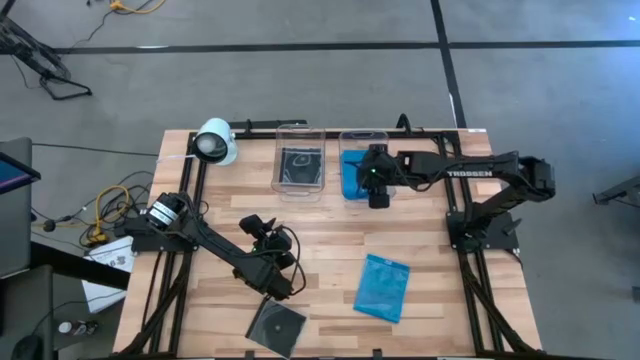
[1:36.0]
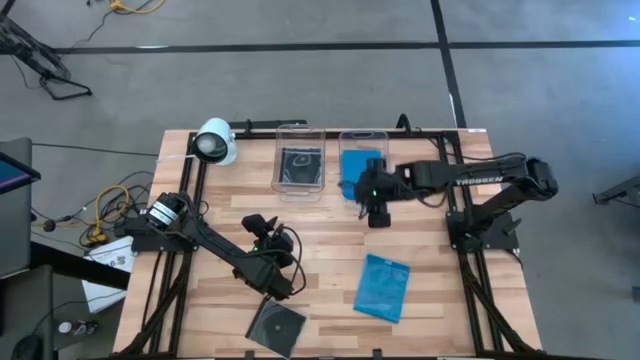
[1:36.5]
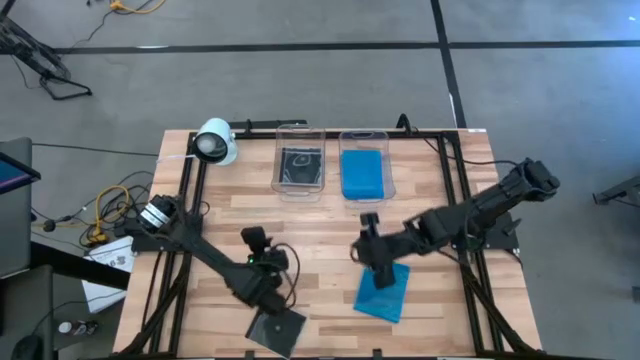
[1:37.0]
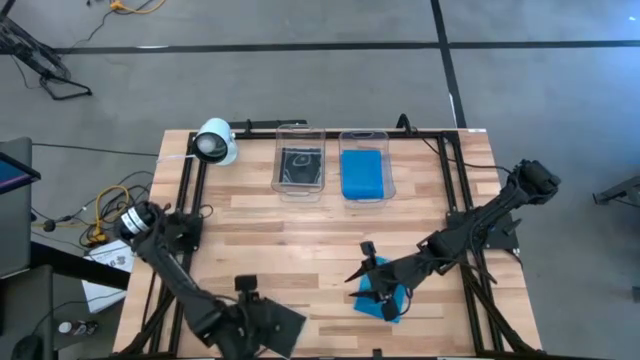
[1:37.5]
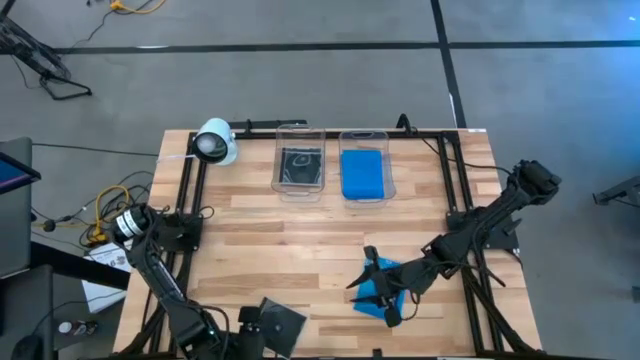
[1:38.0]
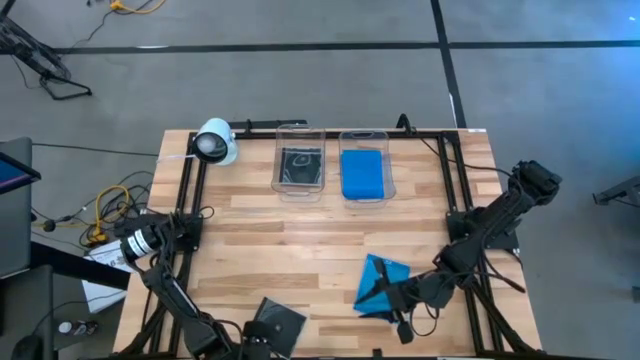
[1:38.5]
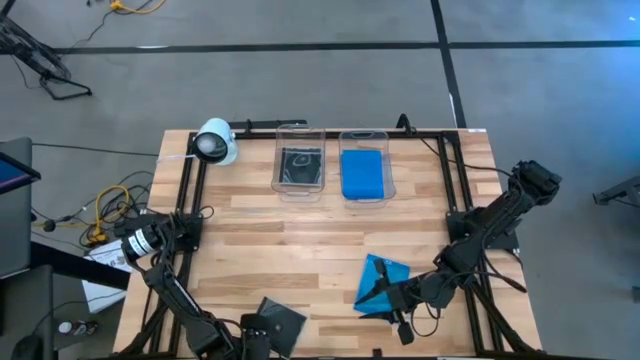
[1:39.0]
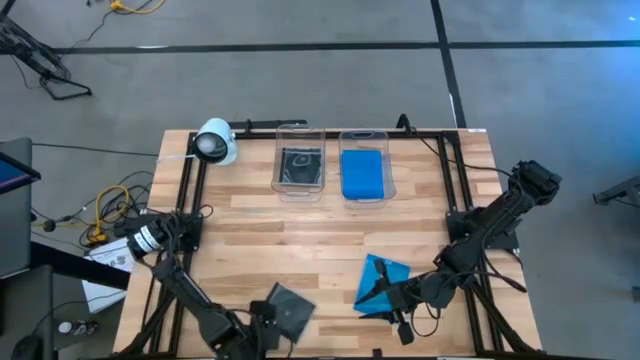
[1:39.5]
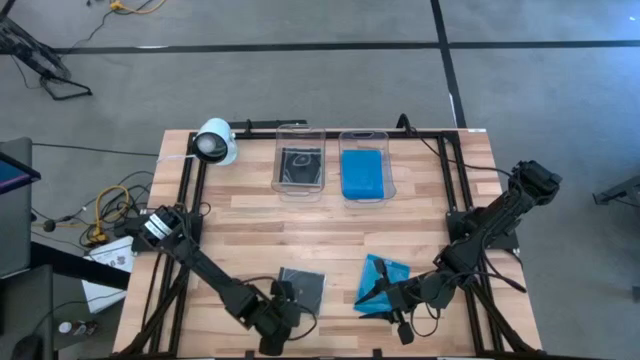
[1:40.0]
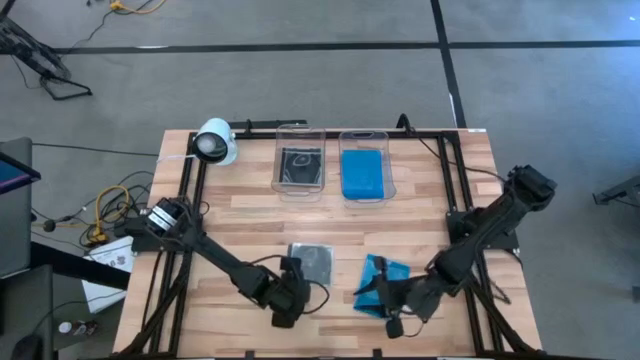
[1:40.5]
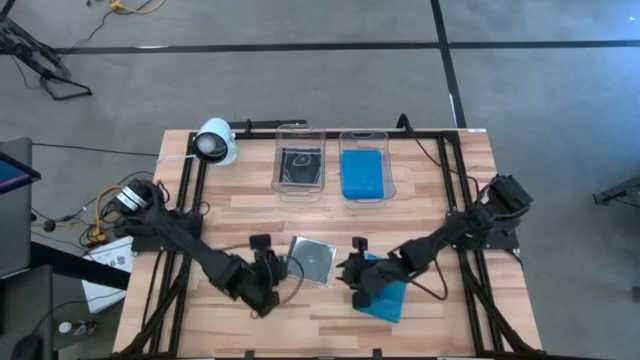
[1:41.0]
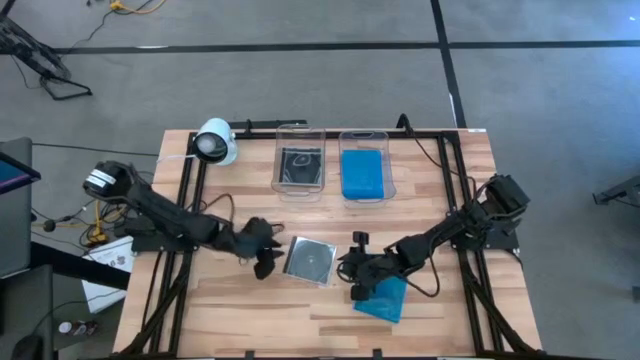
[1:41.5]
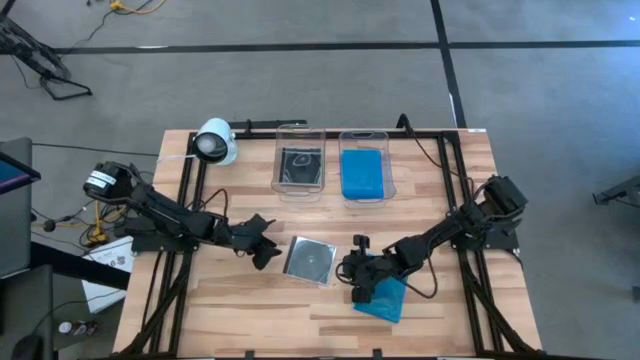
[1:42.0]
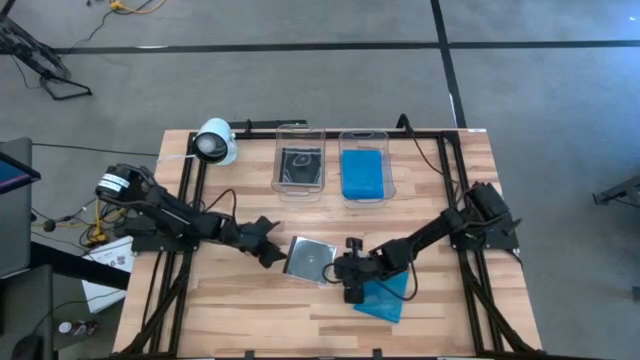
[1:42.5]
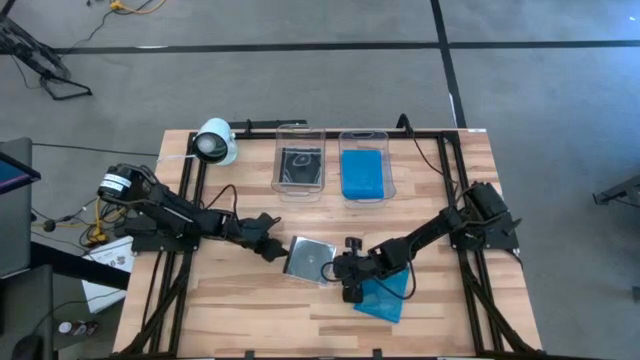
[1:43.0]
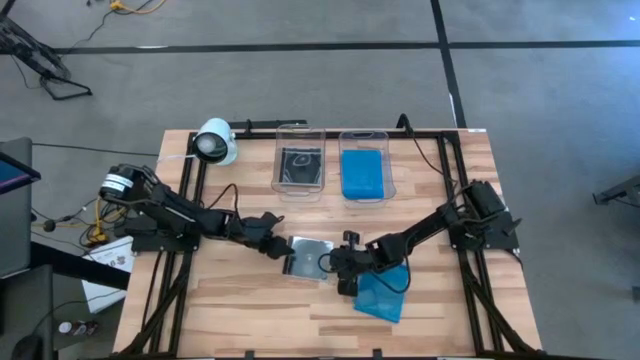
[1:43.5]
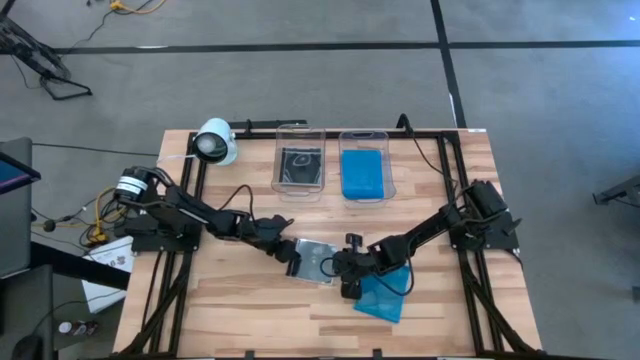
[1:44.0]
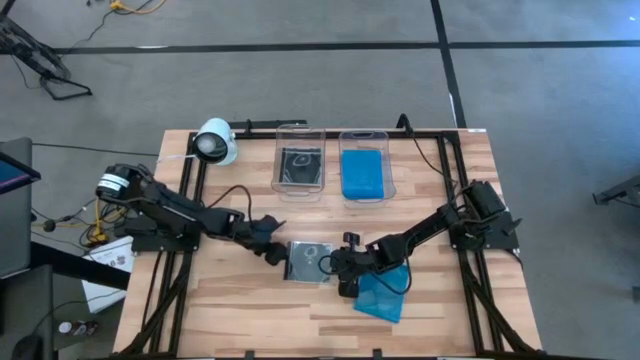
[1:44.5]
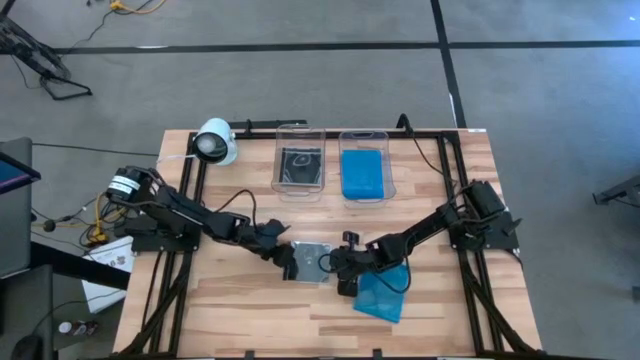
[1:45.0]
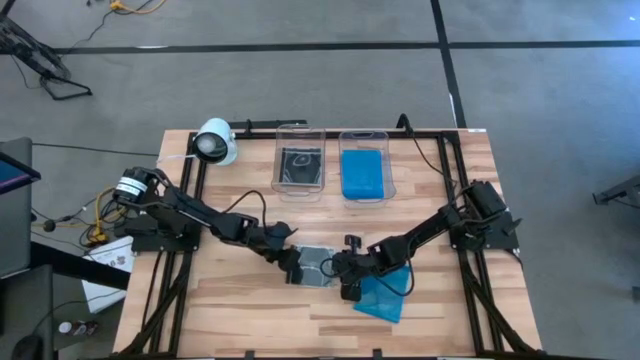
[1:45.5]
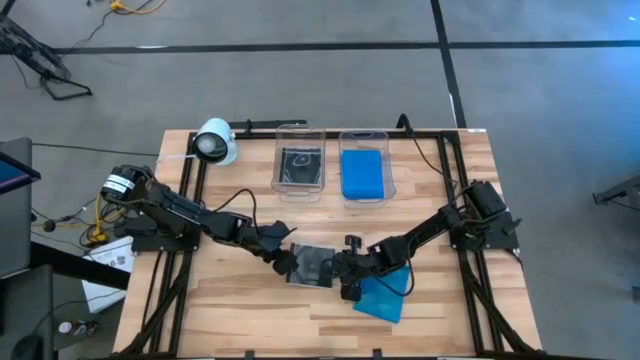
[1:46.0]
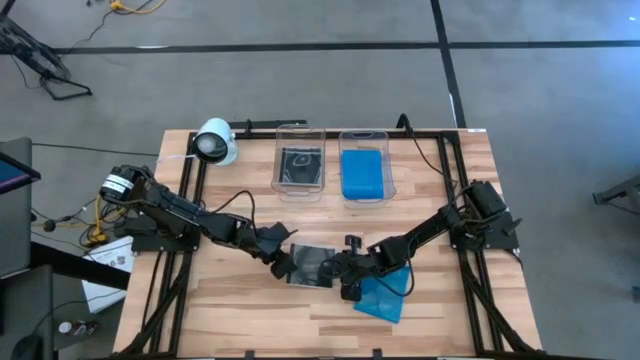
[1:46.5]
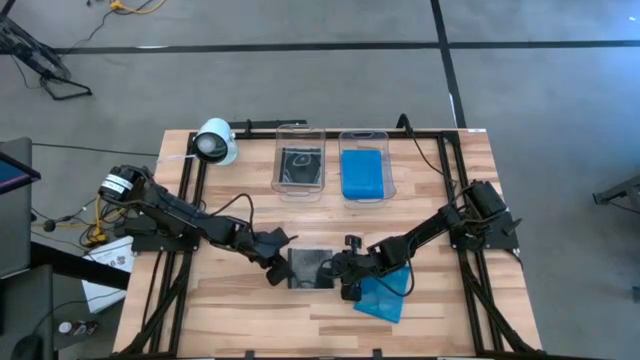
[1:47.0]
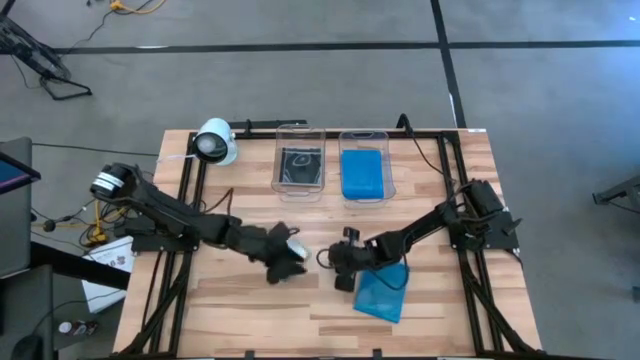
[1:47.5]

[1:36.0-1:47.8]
Task: Pick & place jewel cases by type
Put the black CD case into the left transparent bin

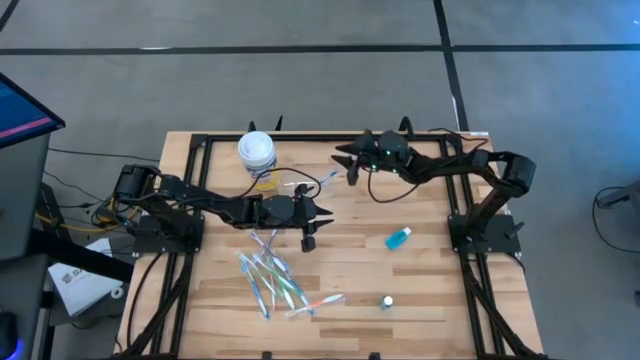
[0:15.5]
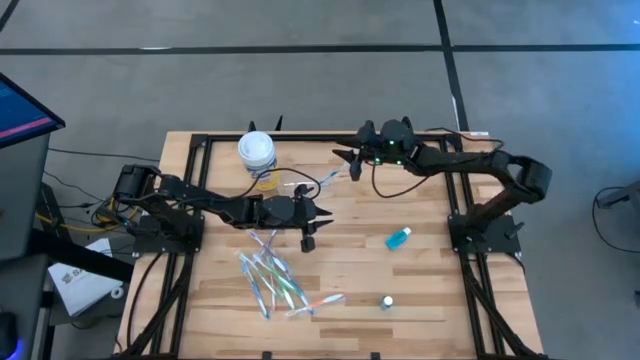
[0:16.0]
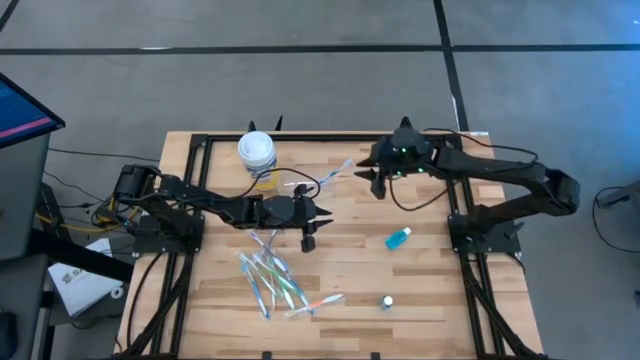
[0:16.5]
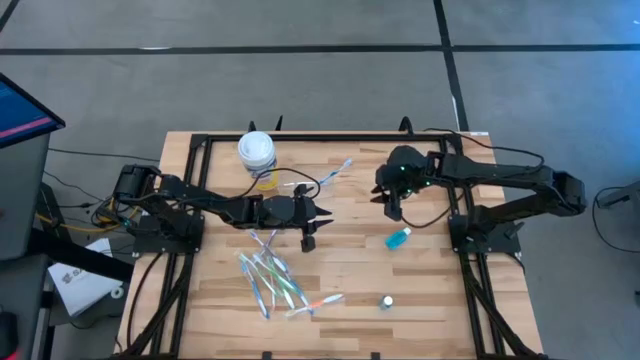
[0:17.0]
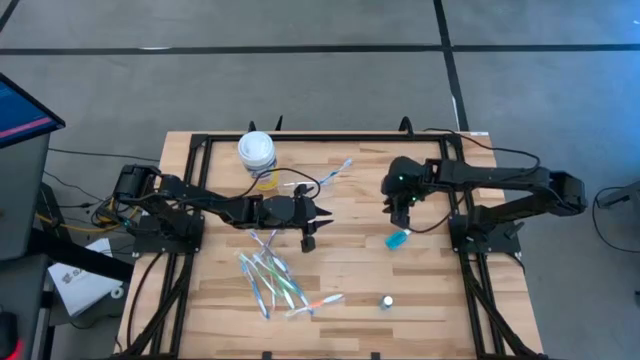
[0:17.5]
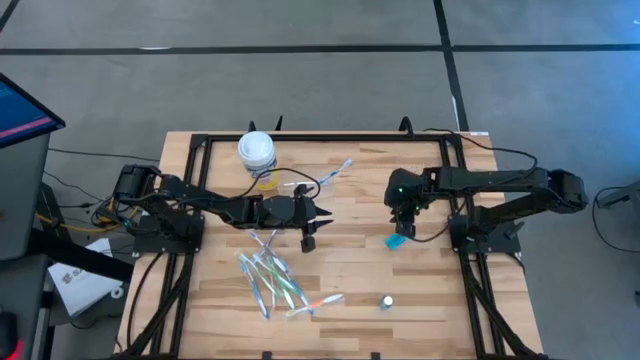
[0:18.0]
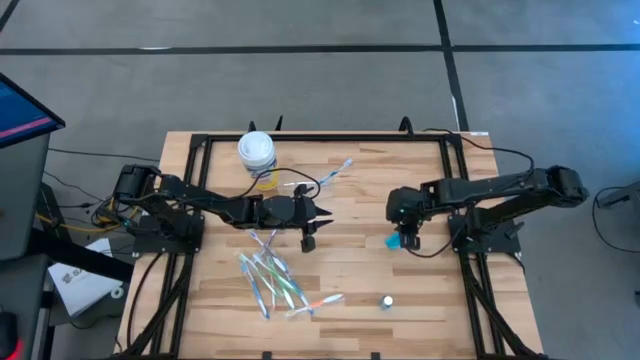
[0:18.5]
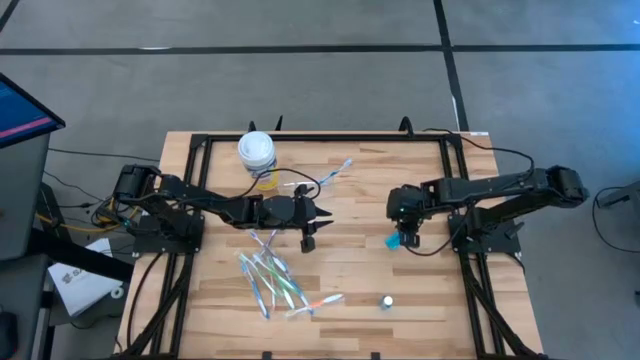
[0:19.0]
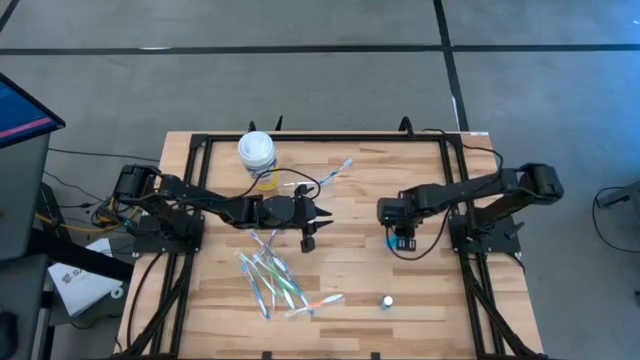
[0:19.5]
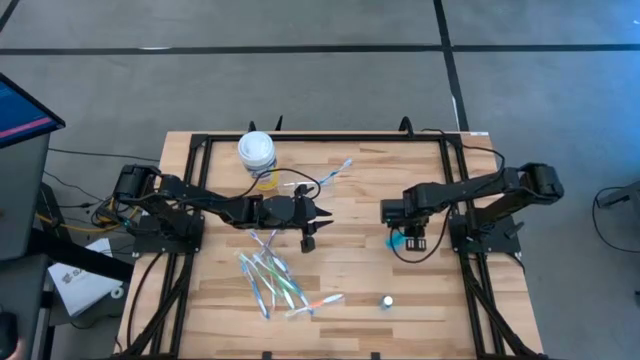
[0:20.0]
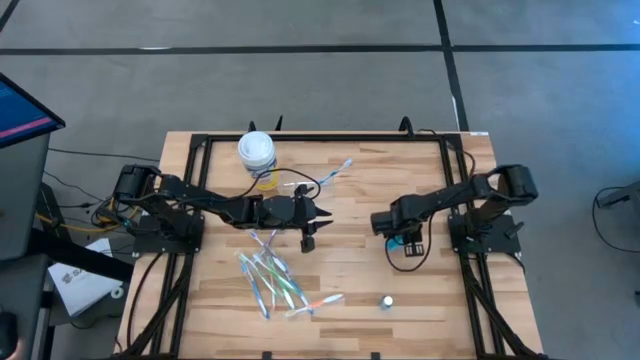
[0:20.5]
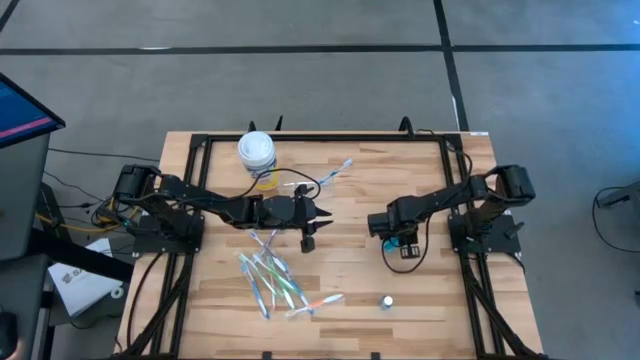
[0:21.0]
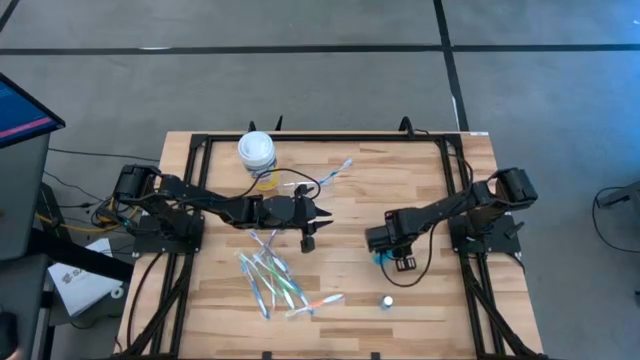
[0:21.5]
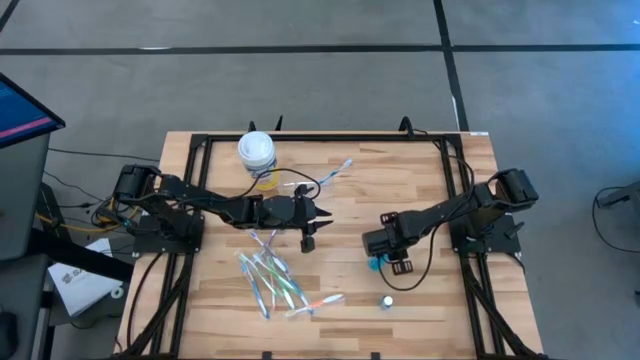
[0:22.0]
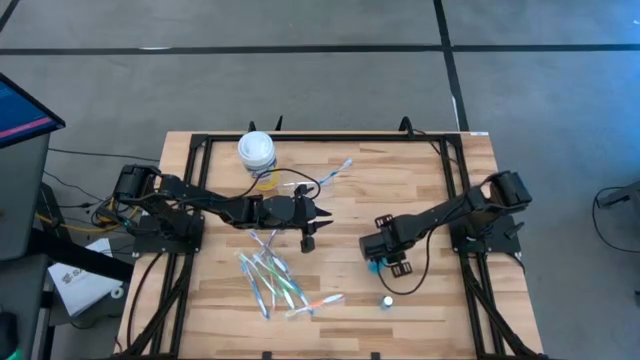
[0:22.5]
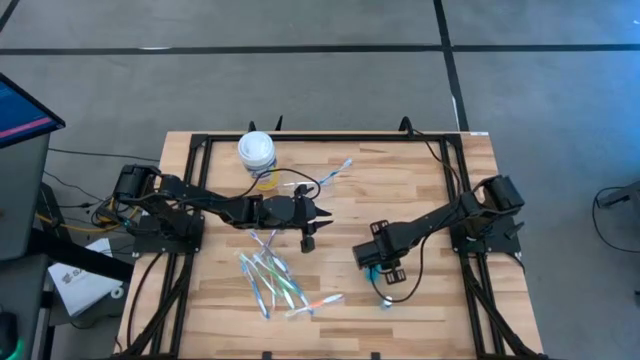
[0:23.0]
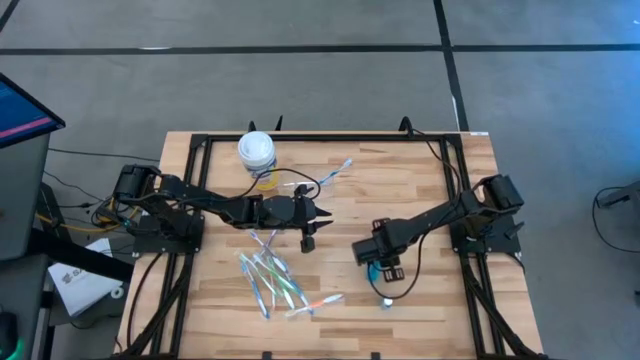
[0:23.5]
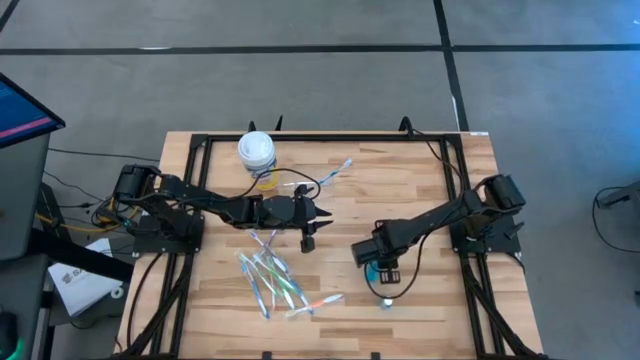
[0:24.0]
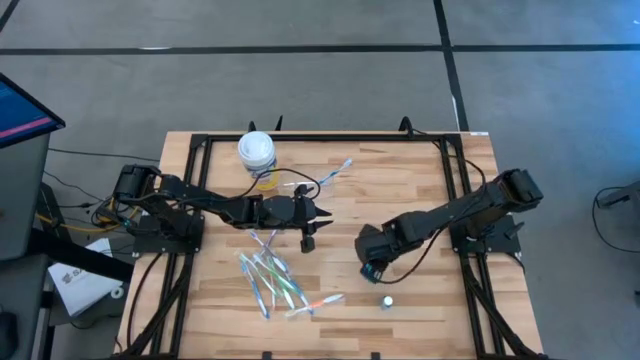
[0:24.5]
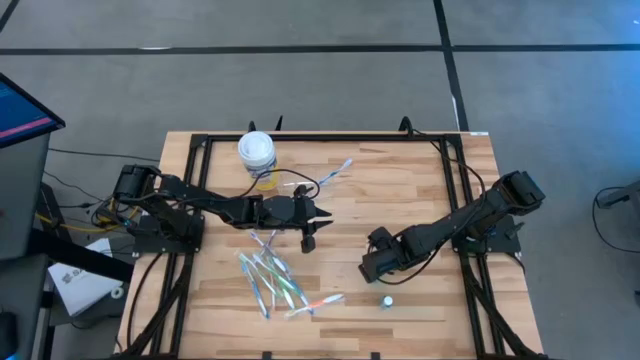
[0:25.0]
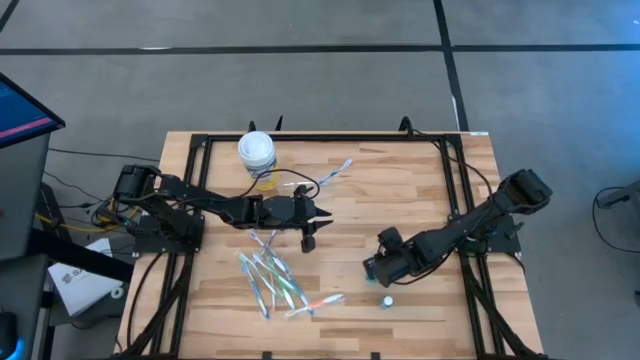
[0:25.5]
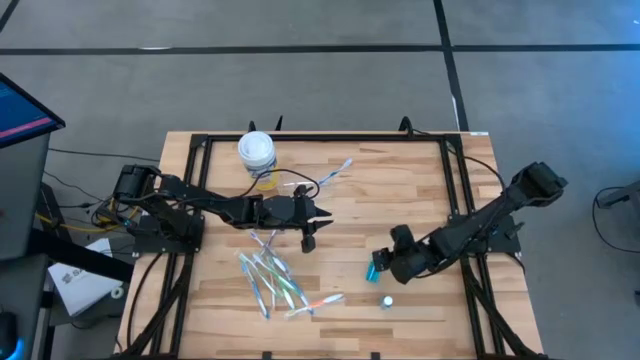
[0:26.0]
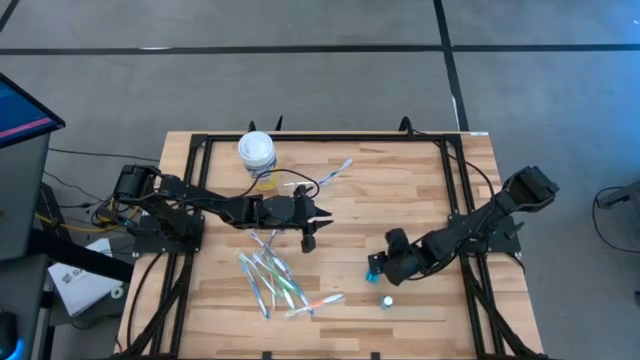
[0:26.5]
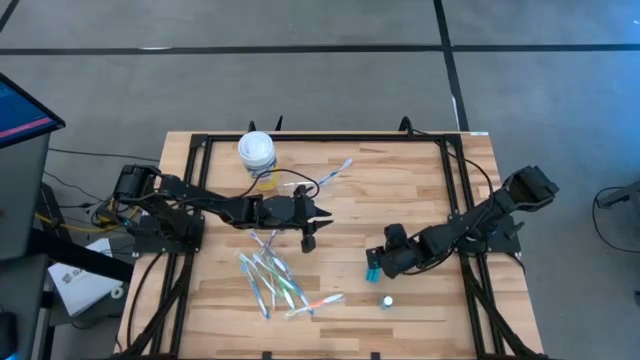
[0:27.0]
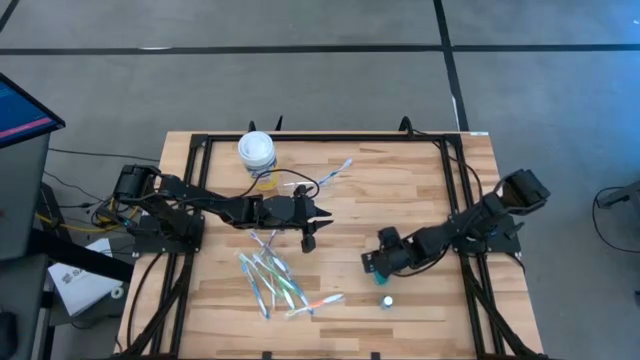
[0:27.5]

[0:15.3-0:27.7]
Task: Pick & Place toothbrushing station
Put the blue mouthwash into the transparent organizer
